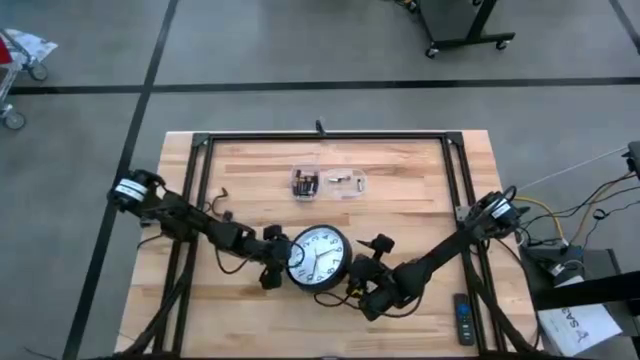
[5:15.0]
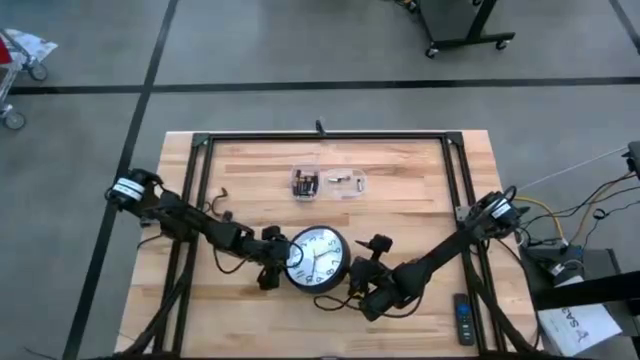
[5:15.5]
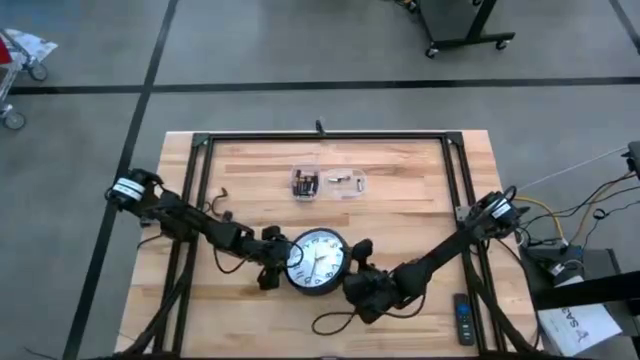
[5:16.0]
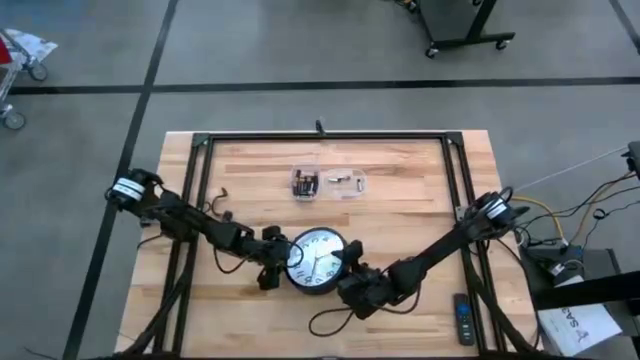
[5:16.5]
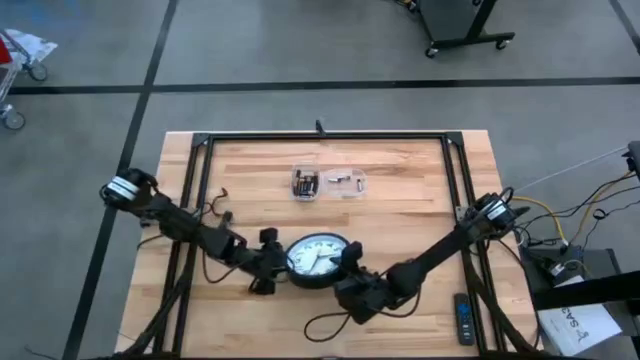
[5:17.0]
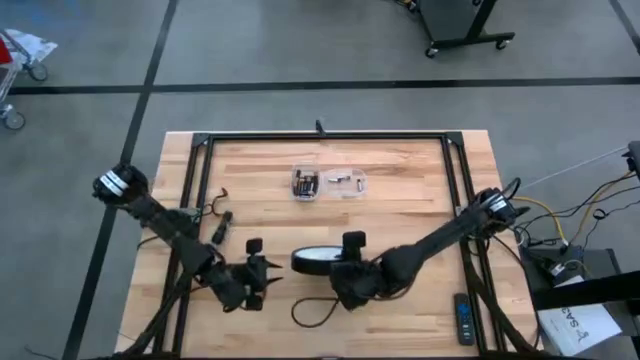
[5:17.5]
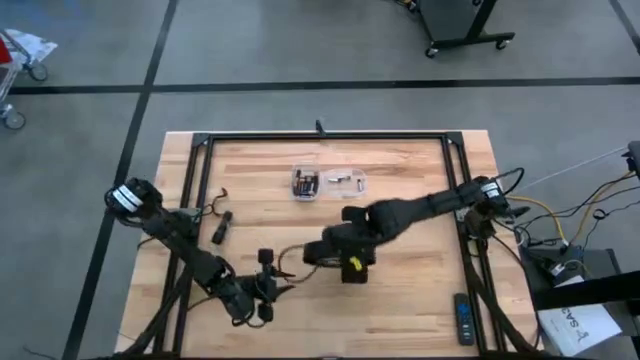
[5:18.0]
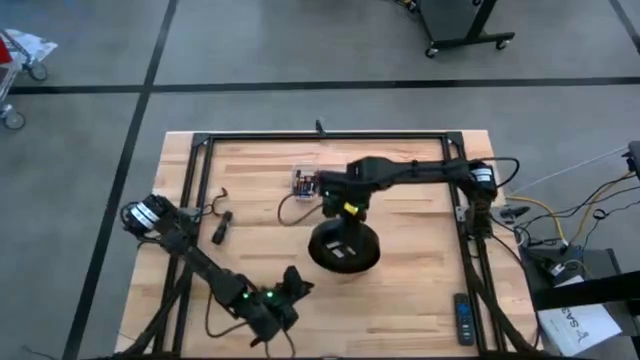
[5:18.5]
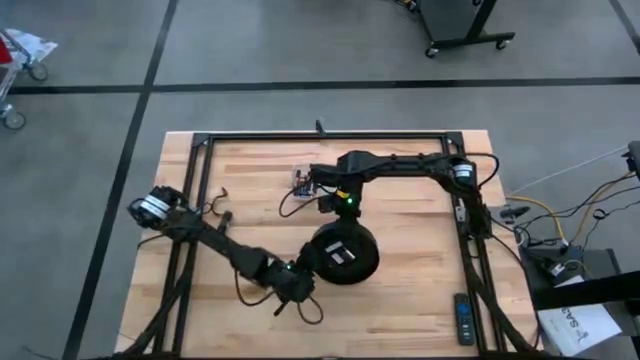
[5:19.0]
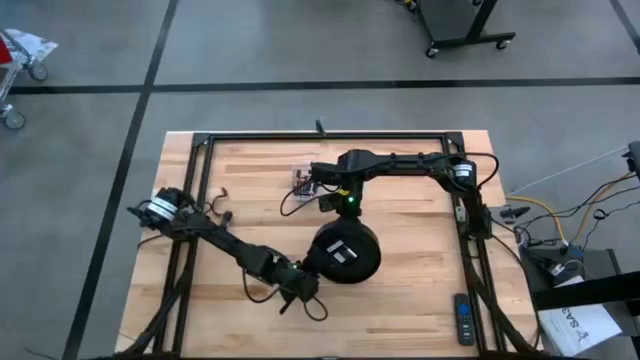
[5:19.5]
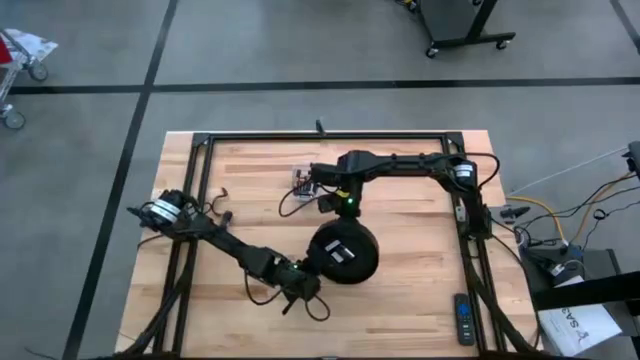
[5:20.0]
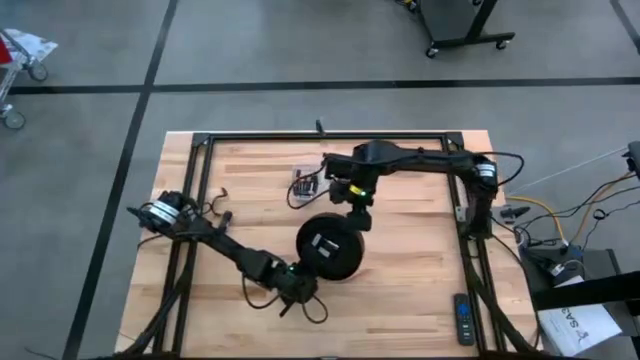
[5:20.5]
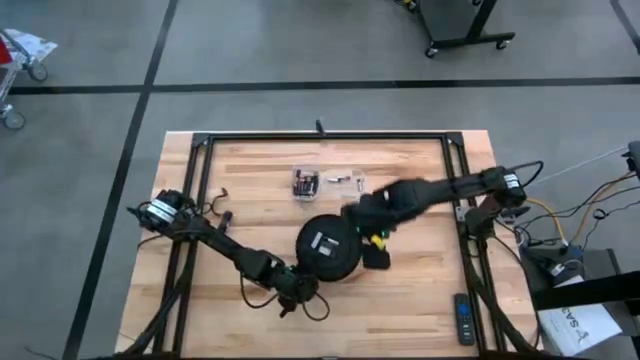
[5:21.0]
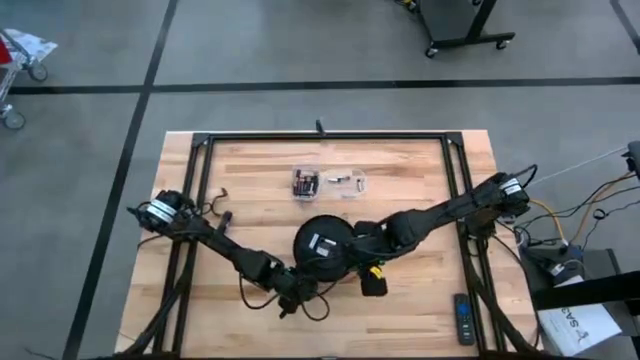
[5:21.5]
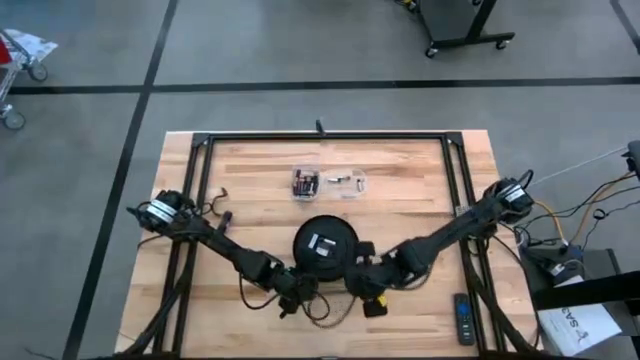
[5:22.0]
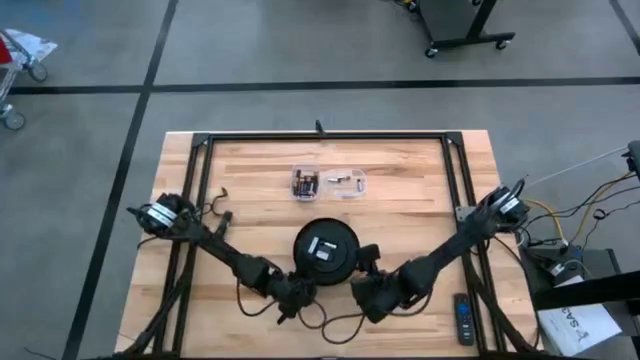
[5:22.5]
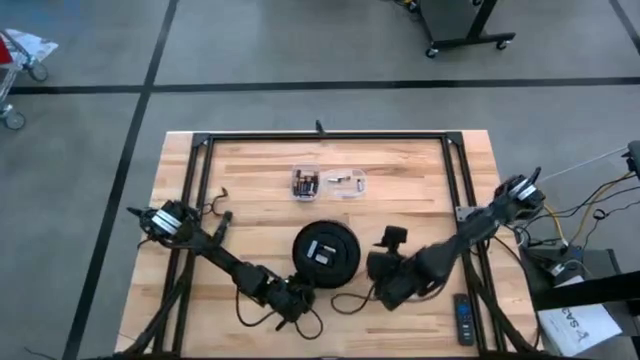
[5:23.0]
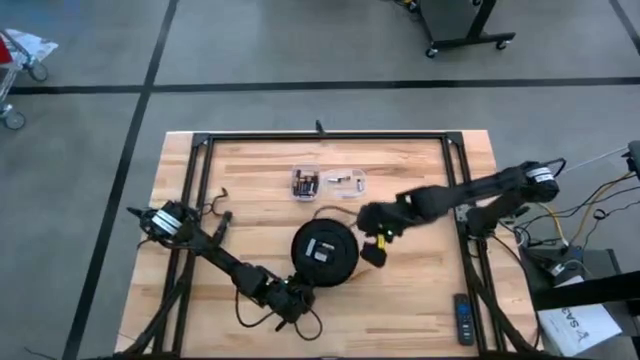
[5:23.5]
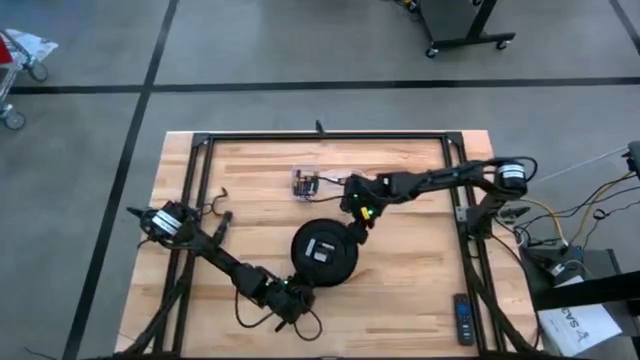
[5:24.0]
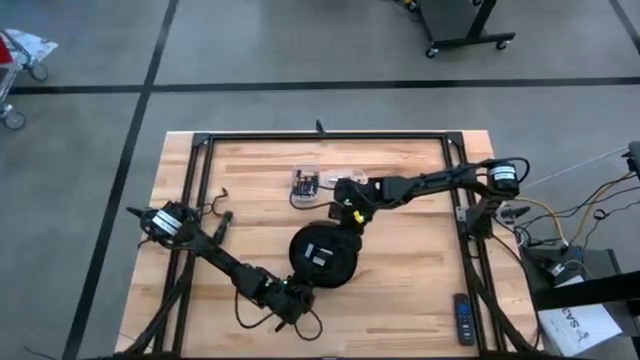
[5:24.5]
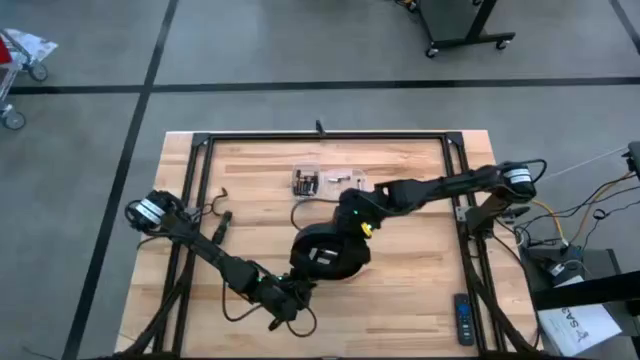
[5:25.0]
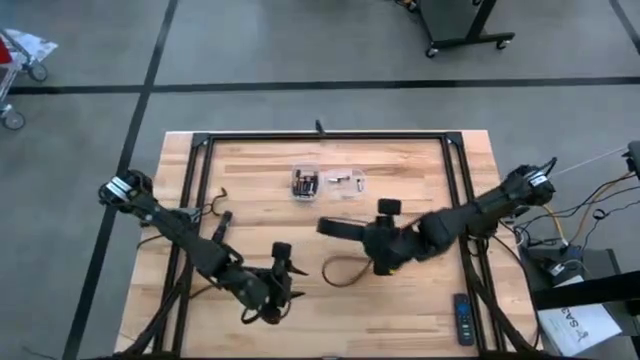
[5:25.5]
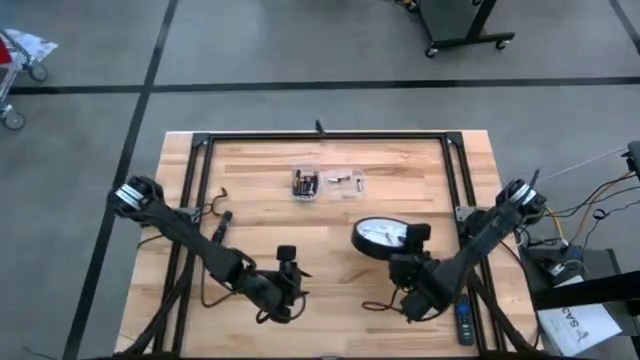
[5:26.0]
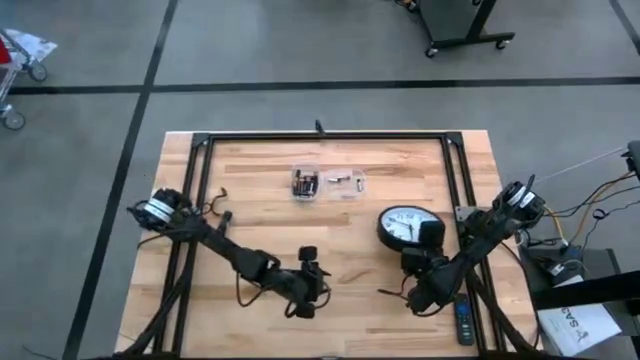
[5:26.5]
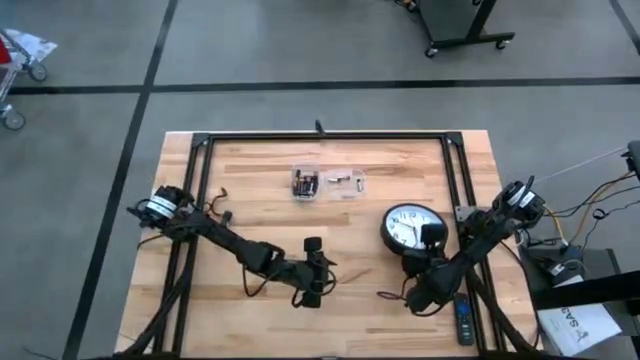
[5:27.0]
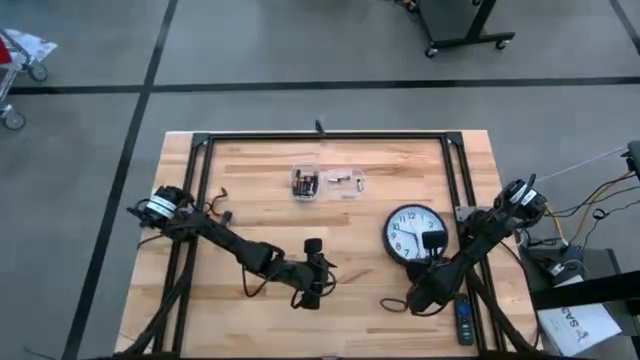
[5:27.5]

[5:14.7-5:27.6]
Task: Insert battery
Adjust the clock

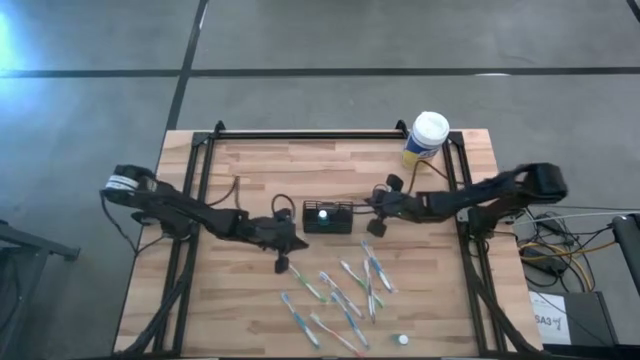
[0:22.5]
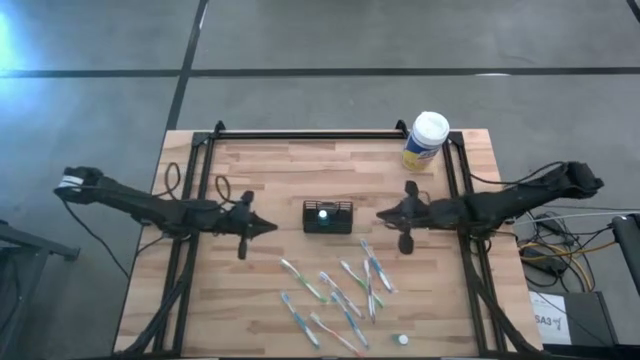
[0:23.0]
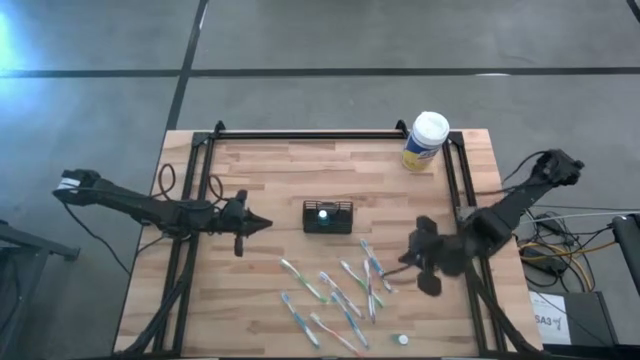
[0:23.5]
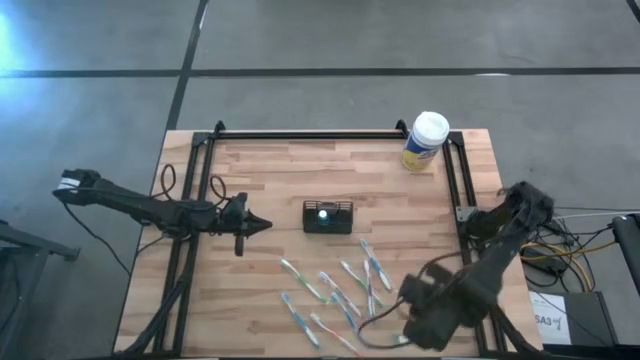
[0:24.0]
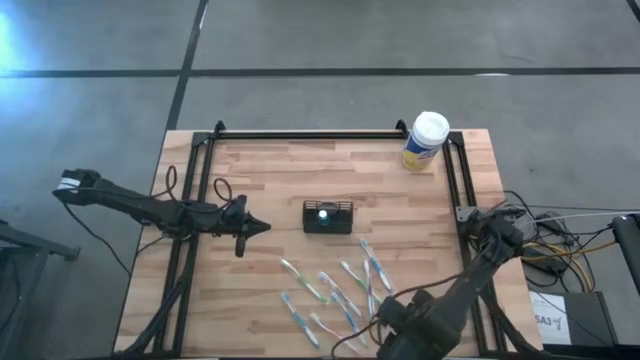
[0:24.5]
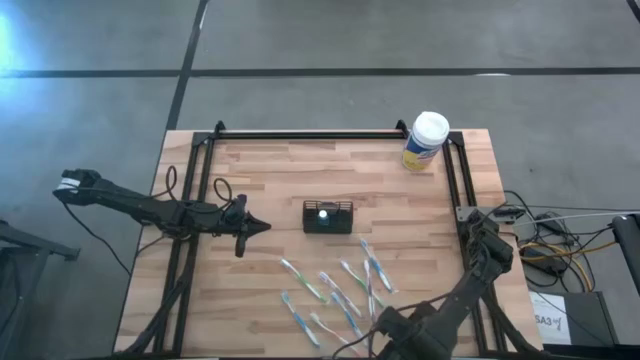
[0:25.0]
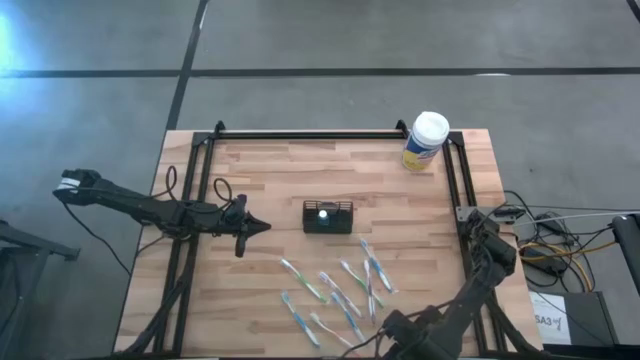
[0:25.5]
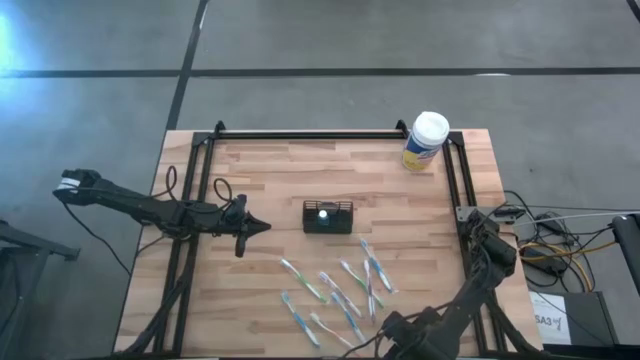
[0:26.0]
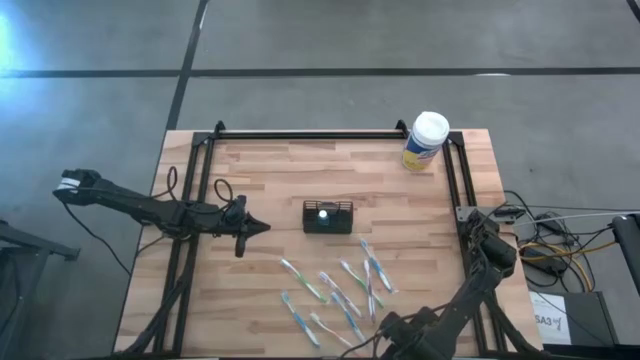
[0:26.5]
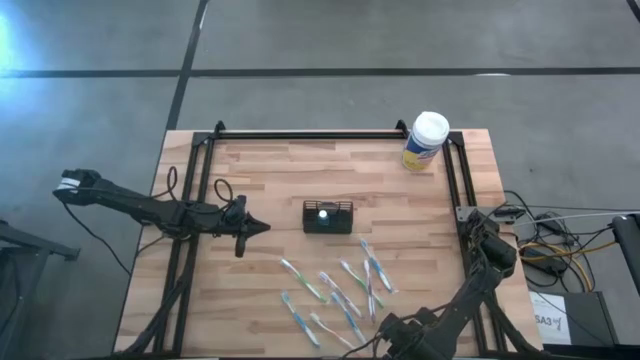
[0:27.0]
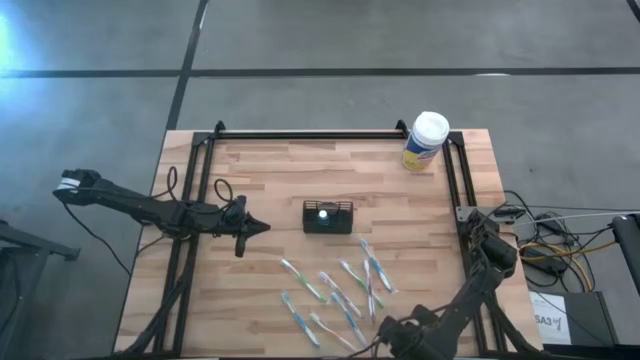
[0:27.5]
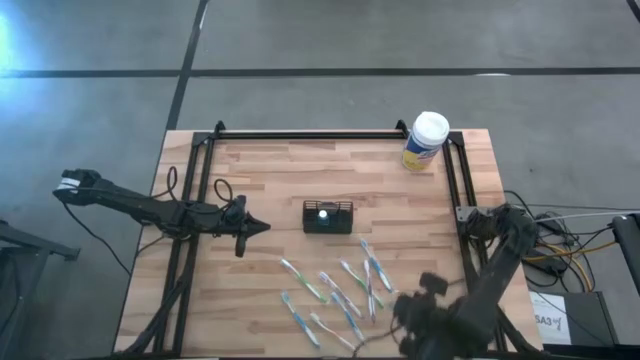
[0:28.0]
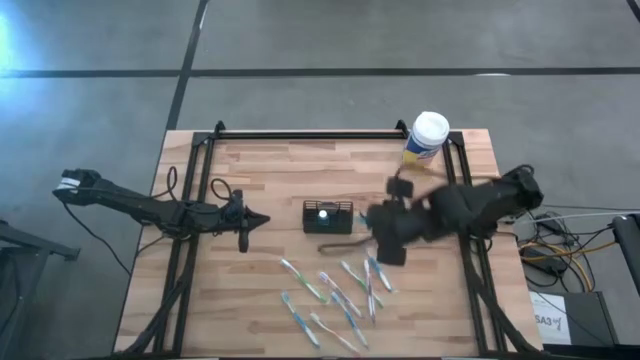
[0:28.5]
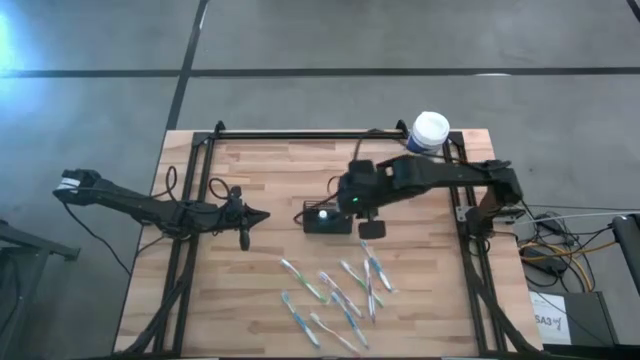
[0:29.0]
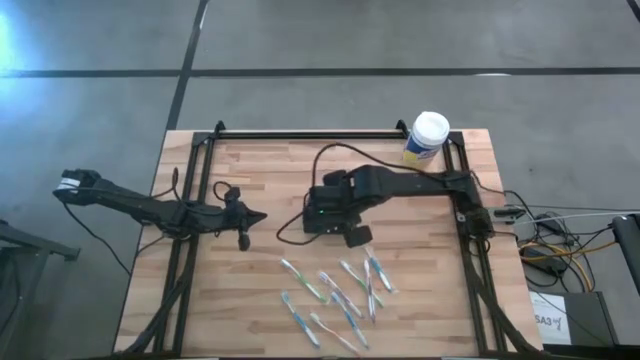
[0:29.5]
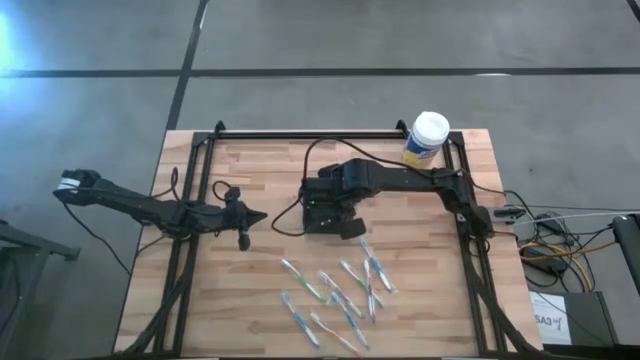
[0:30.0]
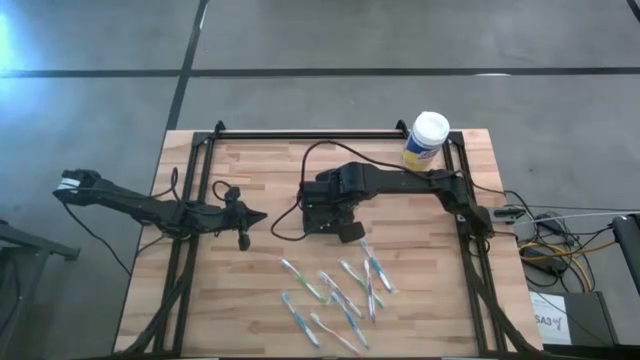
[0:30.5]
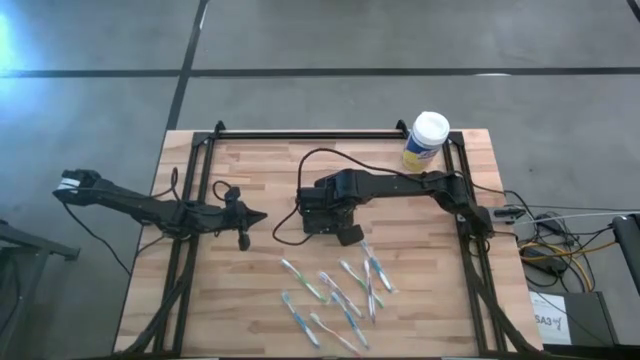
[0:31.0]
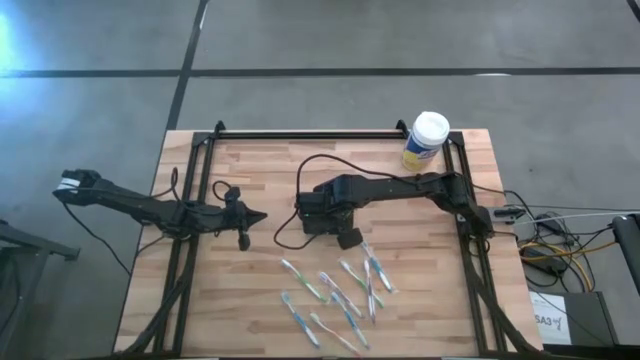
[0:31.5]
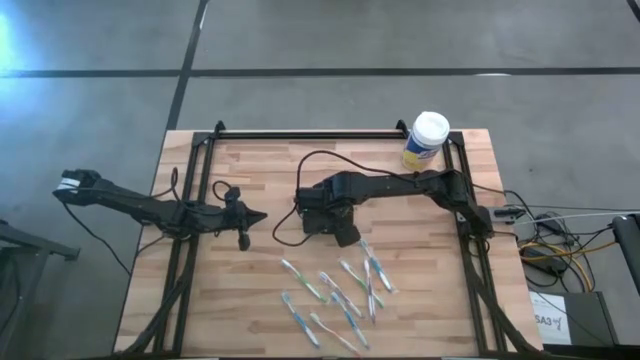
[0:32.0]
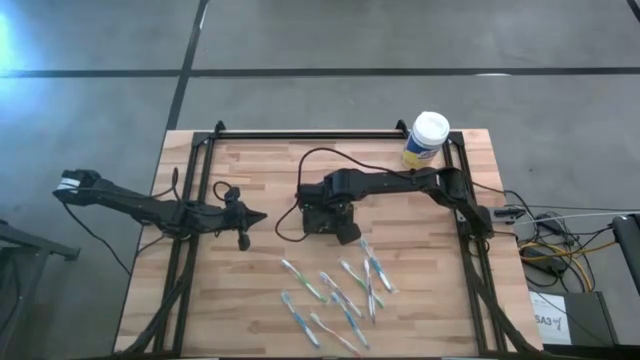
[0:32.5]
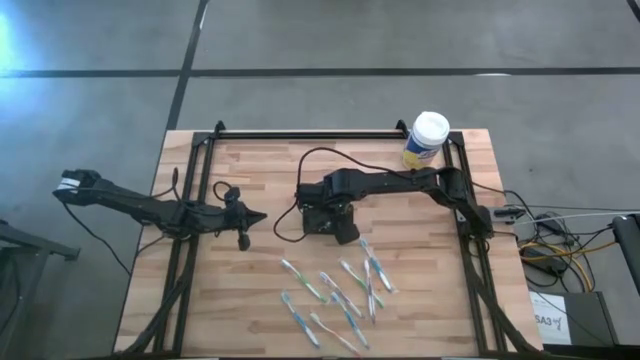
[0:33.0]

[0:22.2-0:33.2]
Task: Pick & Place toothbrushing station
Put the blue mouthwash into the black mesh organizer
